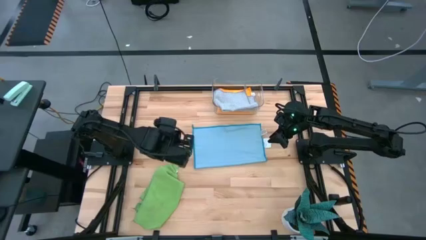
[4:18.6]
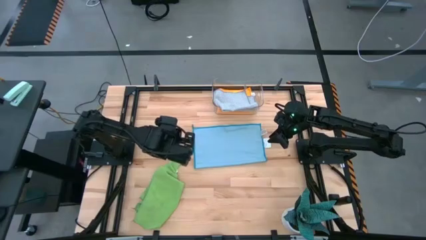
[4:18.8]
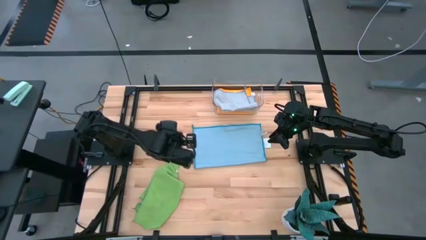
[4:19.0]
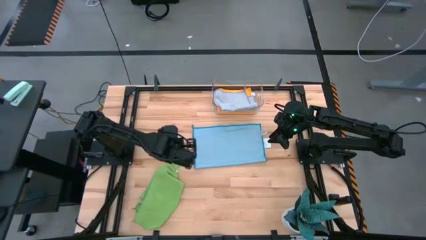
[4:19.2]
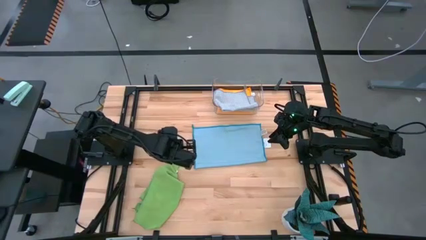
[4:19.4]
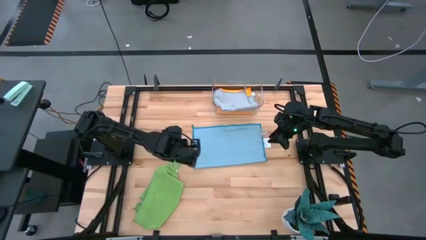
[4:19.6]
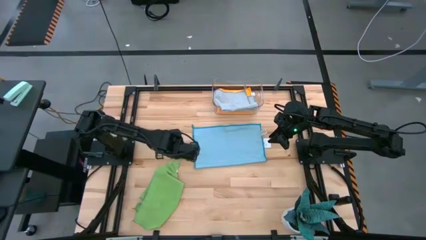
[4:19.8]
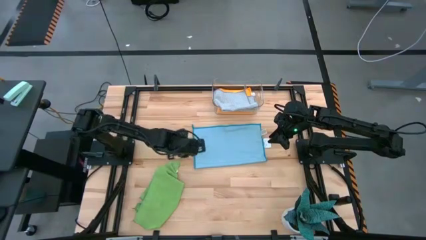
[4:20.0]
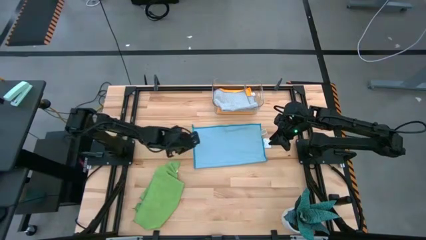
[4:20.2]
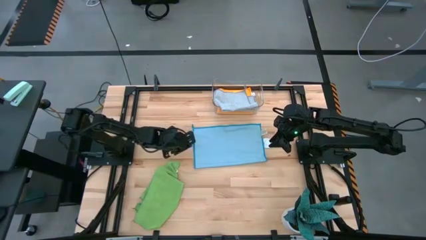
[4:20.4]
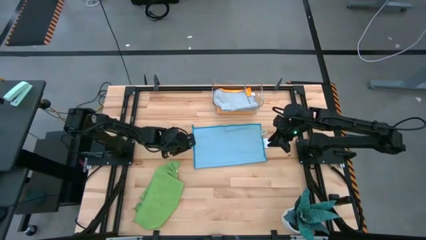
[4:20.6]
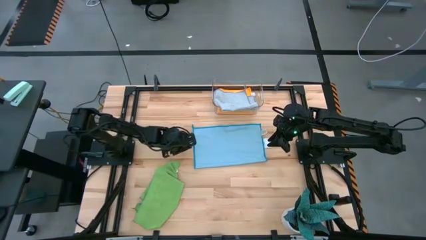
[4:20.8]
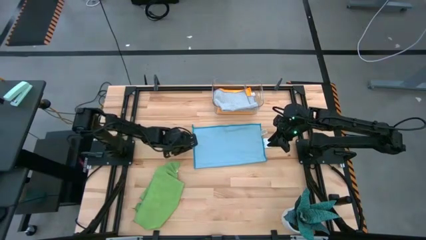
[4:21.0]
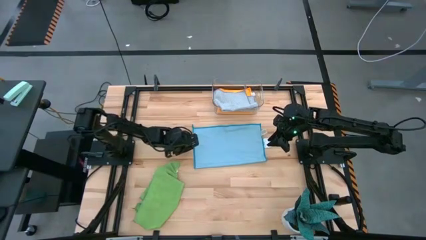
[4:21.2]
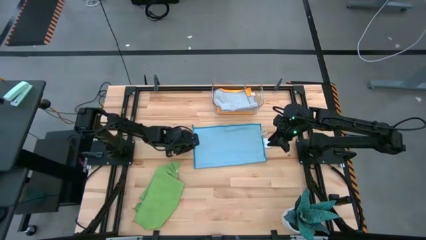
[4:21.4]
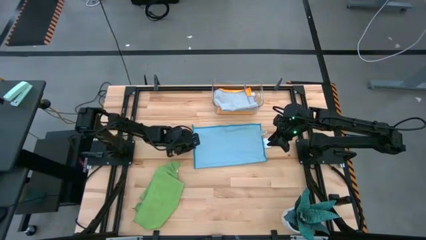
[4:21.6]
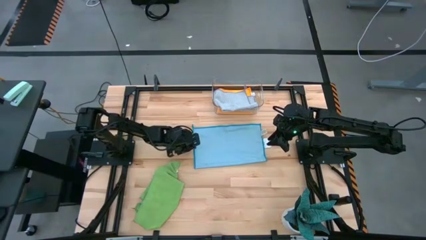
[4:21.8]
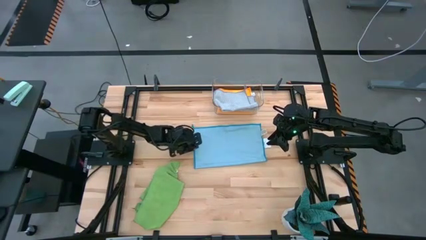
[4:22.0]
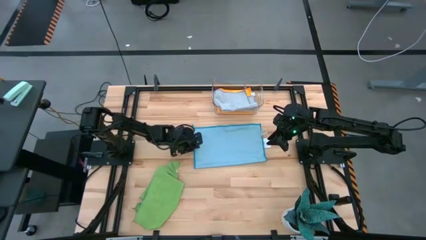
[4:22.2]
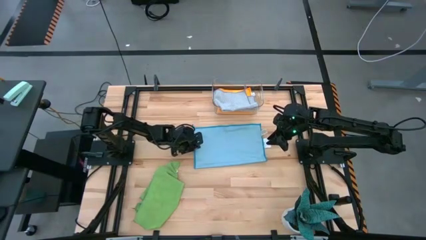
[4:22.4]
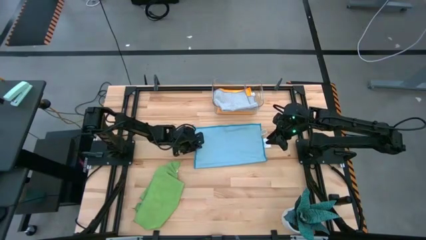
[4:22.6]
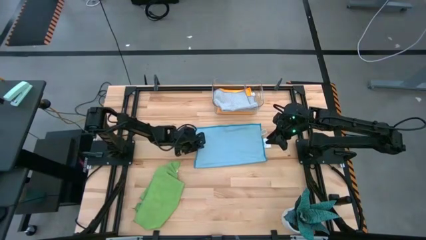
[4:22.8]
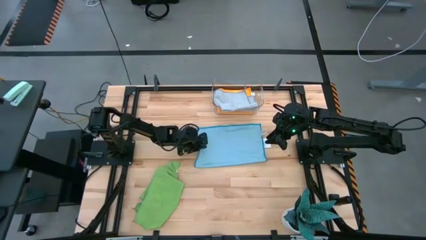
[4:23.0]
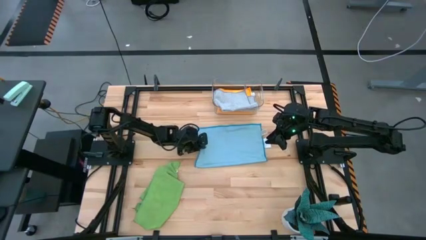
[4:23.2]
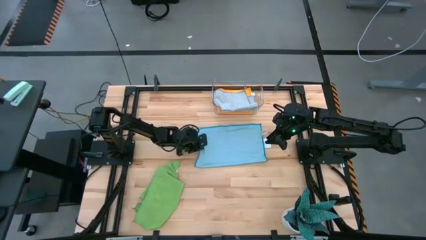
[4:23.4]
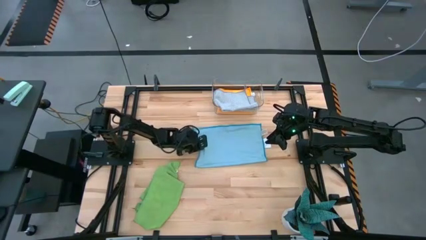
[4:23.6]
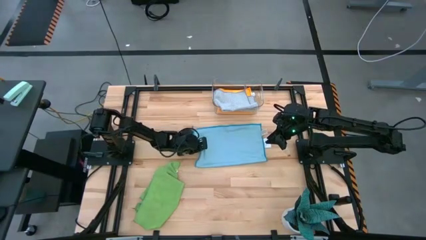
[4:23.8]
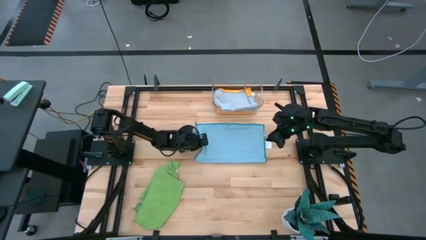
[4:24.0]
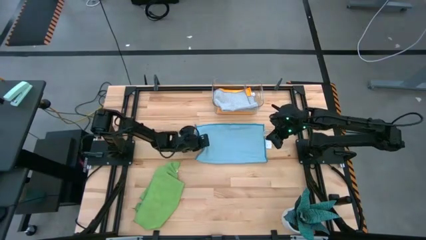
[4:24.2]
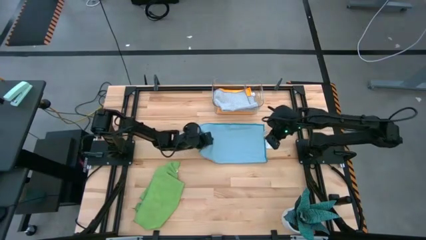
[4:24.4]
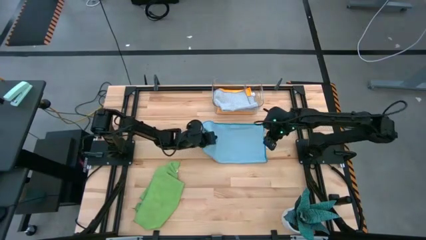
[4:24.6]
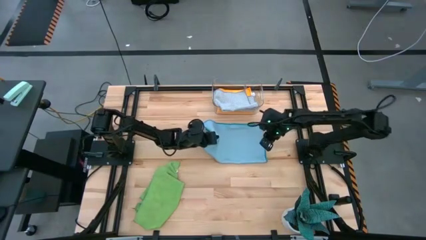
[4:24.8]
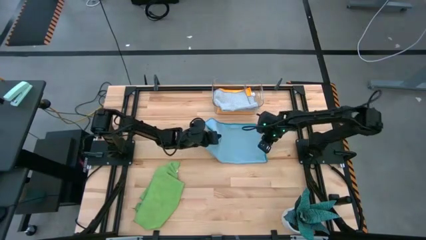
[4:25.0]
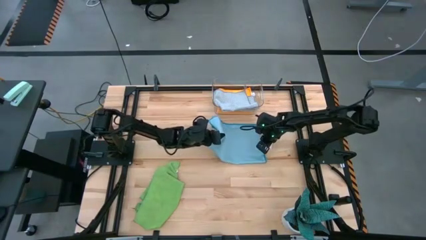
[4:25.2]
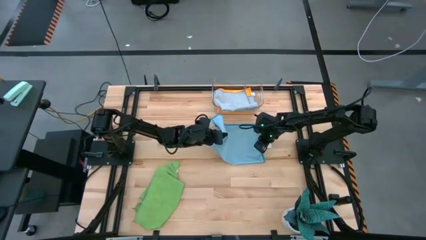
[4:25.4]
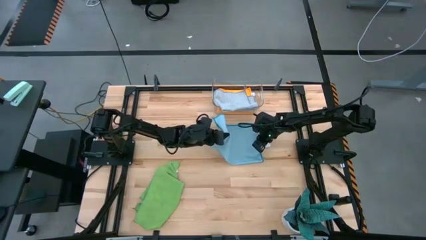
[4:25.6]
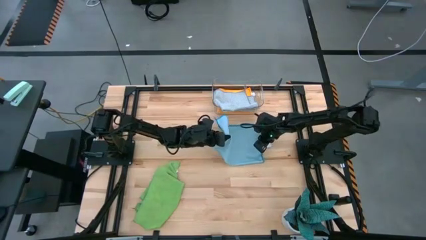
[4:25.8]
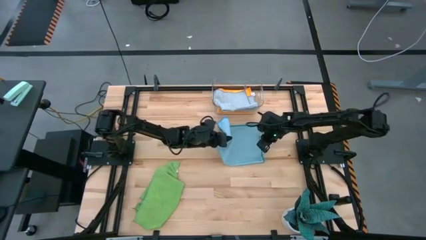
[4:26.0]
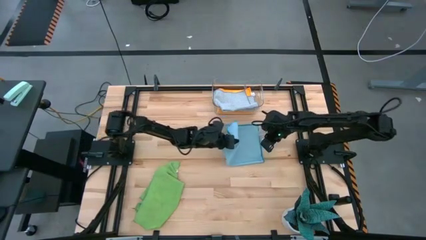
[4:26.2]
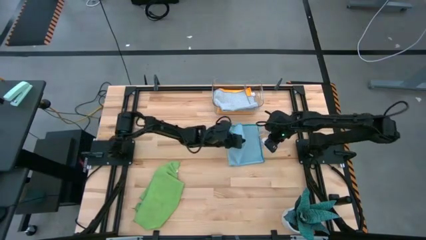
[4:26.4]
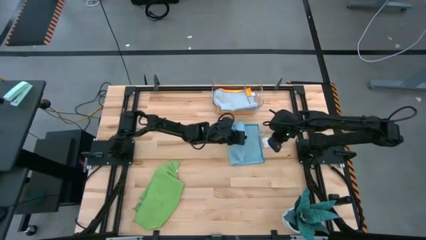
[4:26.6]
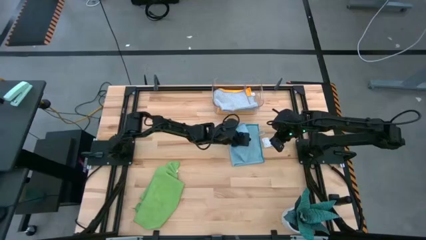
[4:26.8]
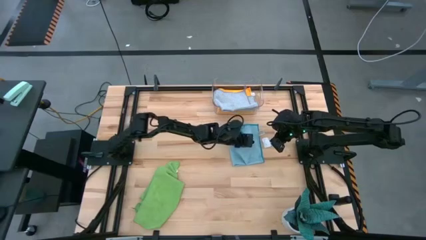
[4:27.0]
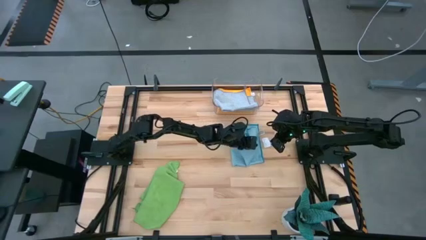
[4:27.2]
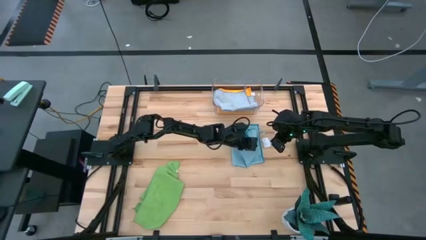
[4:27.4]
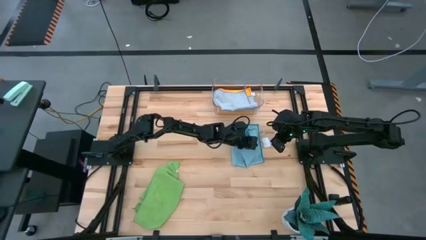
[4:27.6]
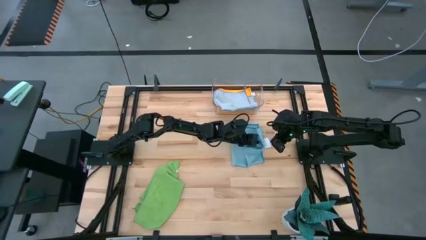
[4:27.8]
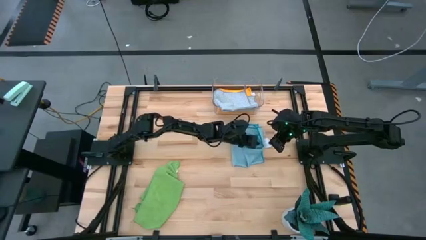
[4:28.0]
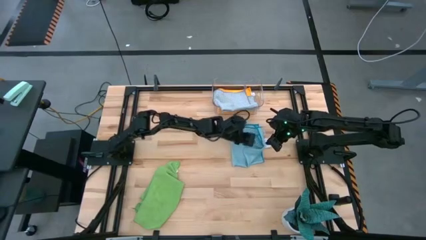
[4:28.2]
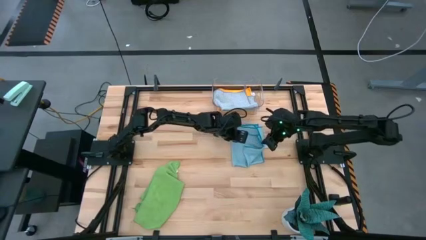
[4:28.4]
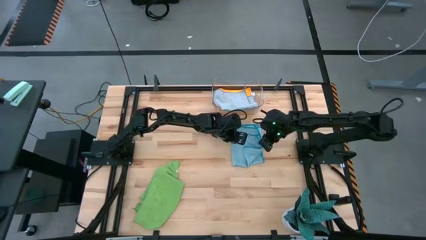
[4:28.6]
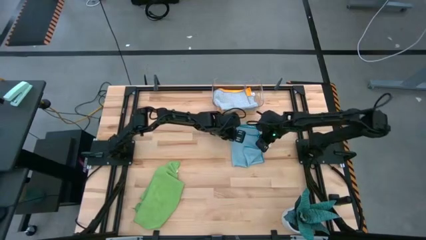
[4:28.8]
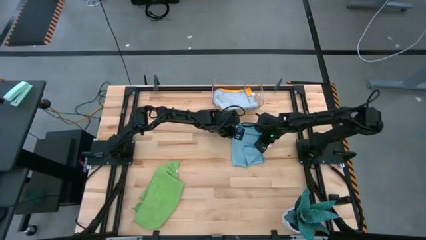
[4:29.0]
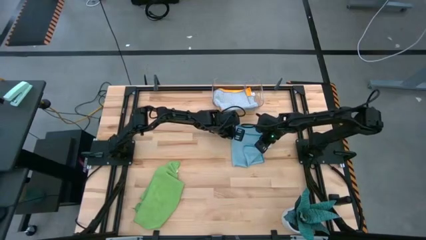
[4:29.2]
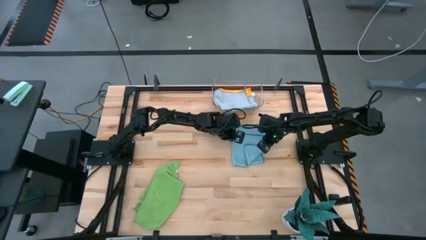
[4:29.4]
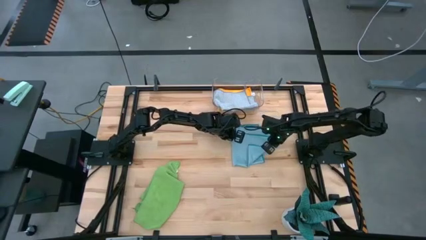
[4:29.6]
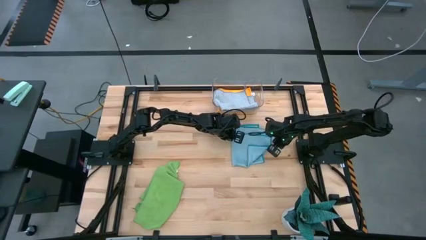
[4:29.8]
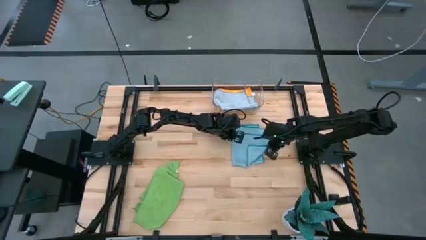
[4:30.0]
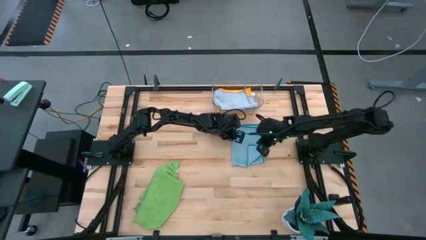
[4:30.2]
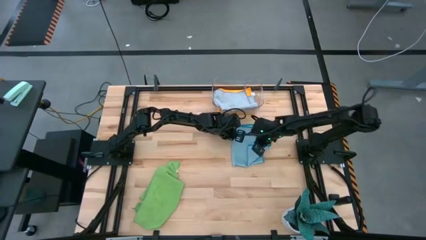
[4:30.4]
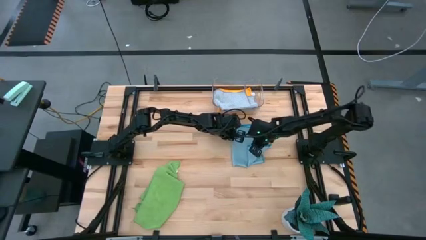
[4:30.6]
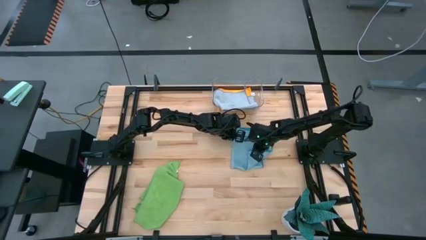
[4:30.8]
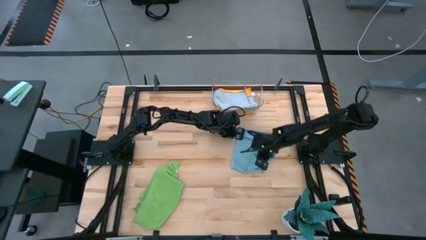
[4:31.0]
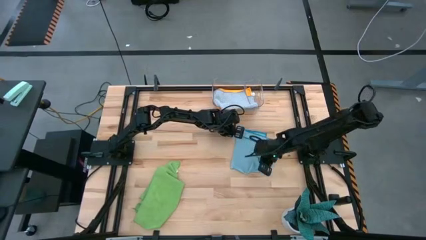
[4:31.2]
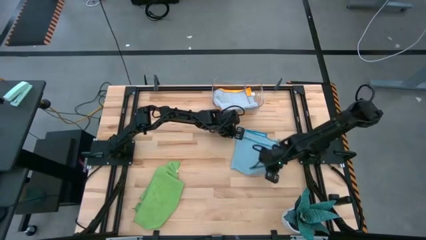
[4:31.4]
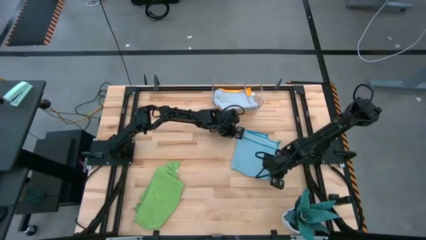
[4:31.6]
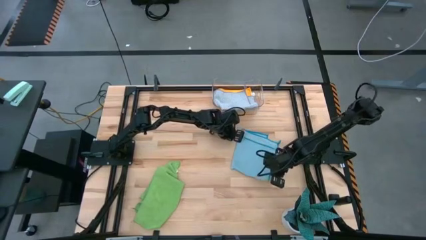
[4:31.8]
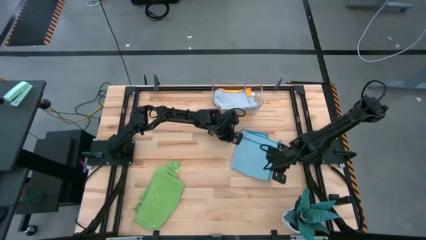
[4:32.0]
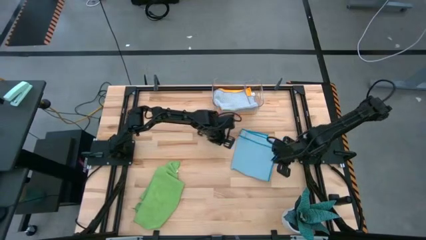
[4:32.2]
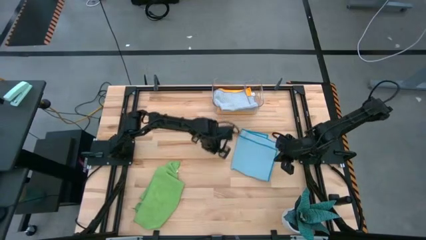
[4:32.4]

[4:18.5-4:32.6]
Task: Fold microfiber towels
Fold the blue microfiber cloth
